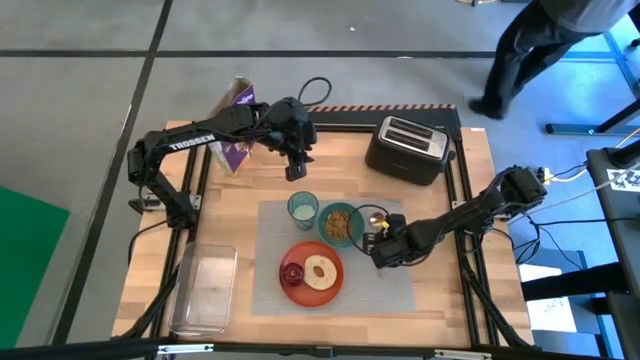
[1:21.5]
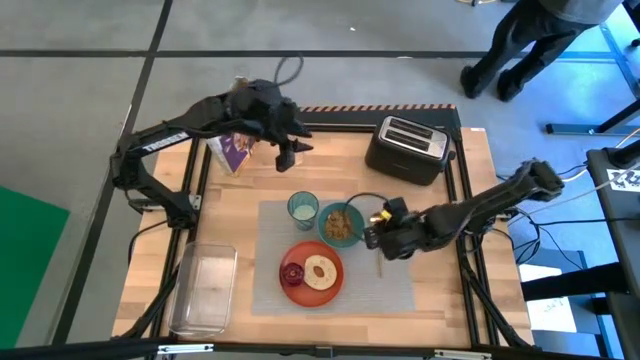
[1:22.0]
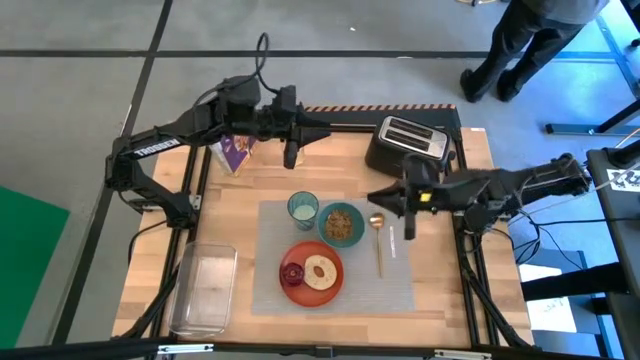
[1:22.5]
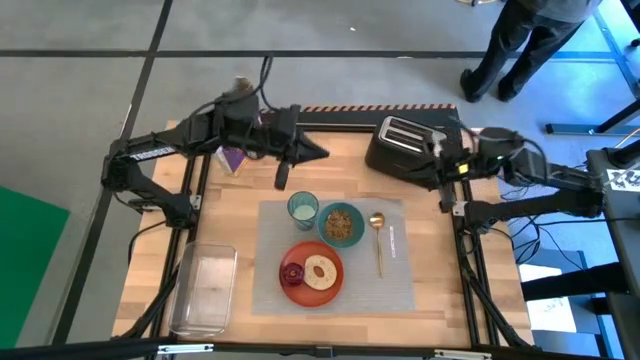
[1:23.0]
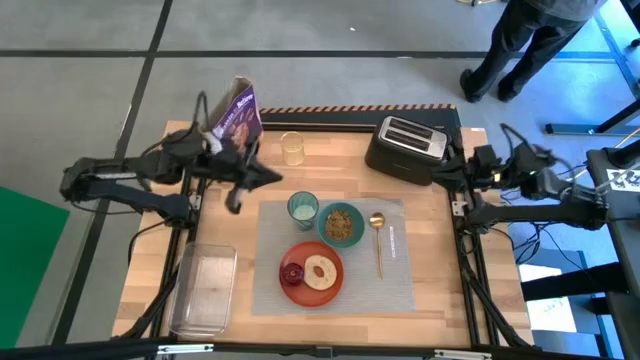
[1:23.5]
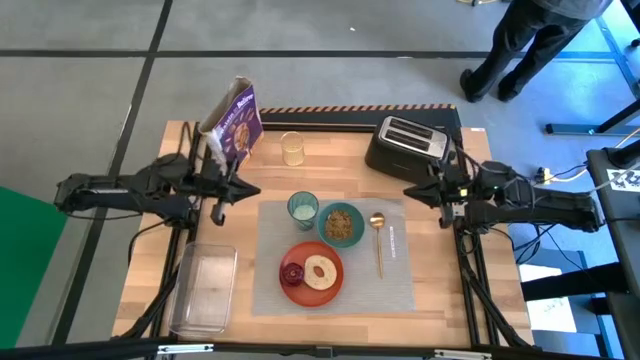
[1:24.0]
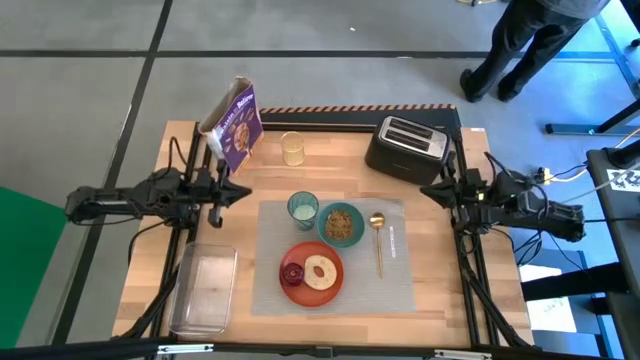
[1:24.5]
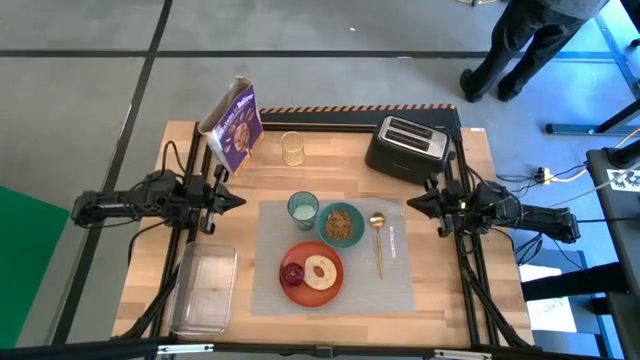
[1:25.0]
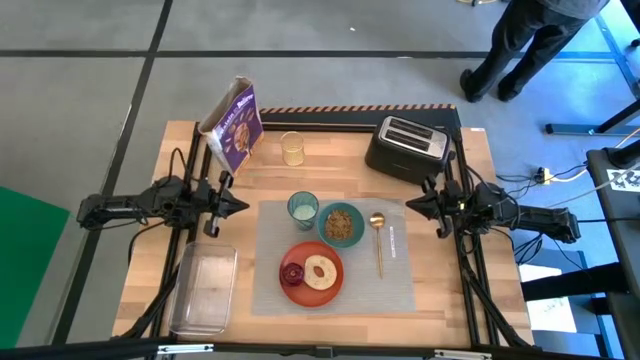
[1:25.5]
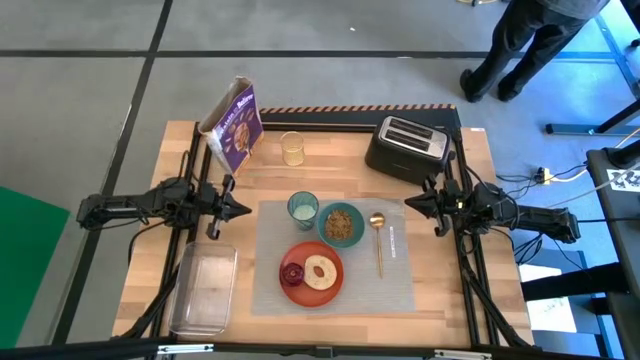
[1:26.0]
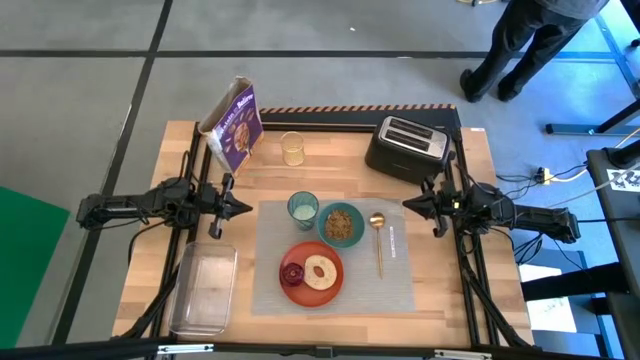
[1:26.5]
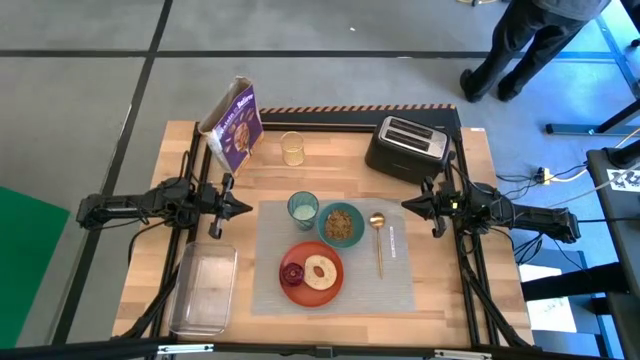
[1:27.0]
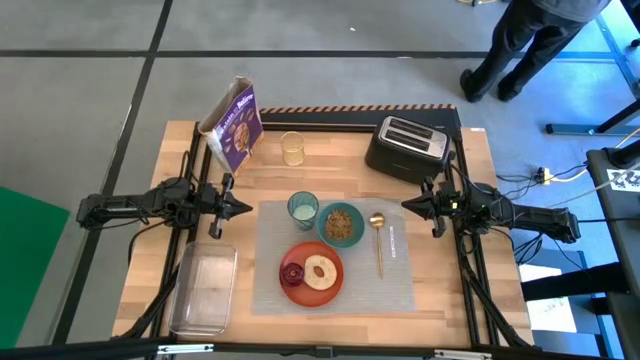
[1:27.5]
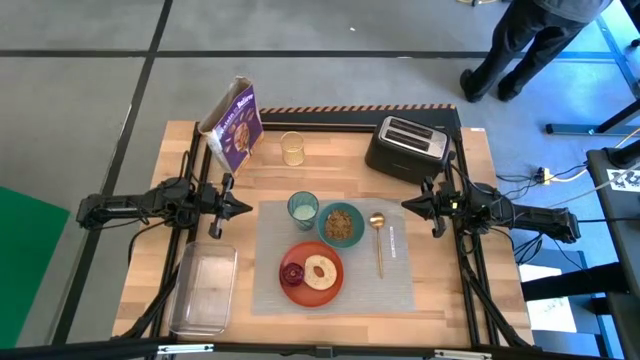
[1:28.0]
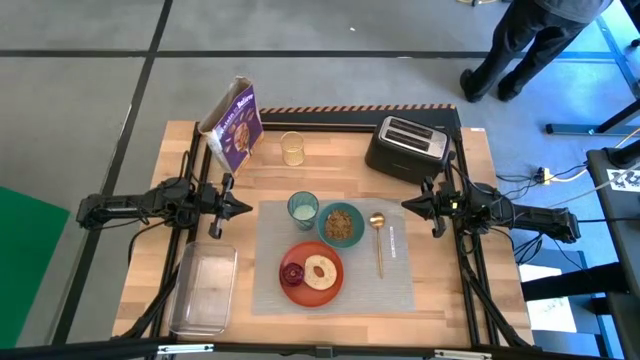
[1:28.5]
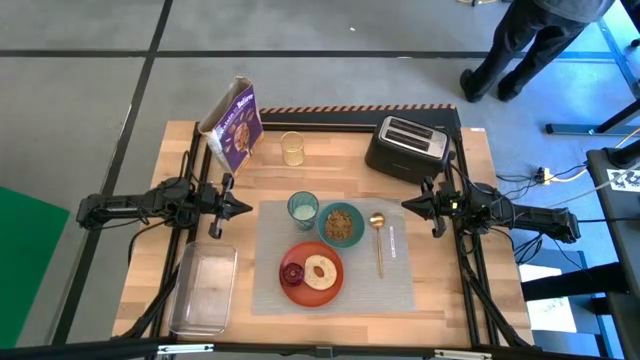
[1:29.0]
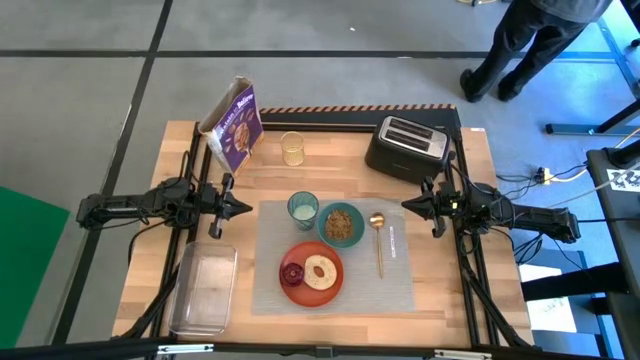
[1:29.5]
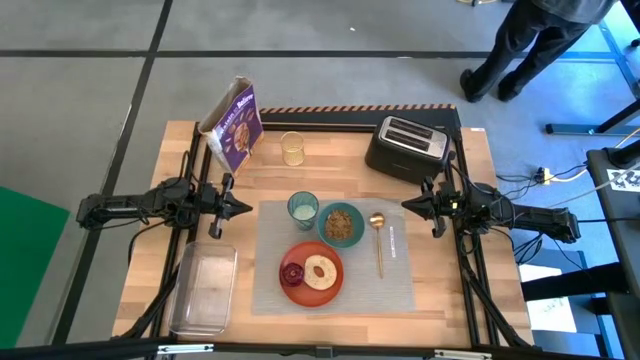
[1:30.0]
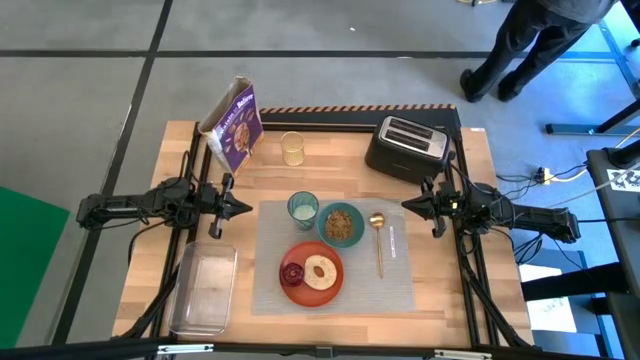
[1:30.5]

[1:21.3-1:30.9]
Task: Arrange a breakfast setting
Return to Home Position

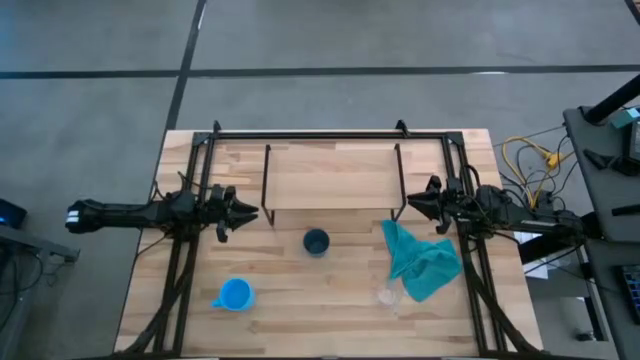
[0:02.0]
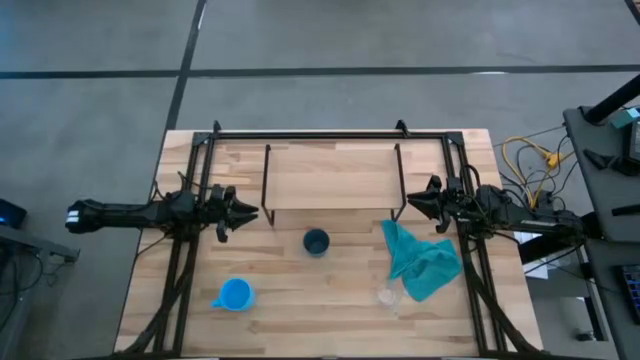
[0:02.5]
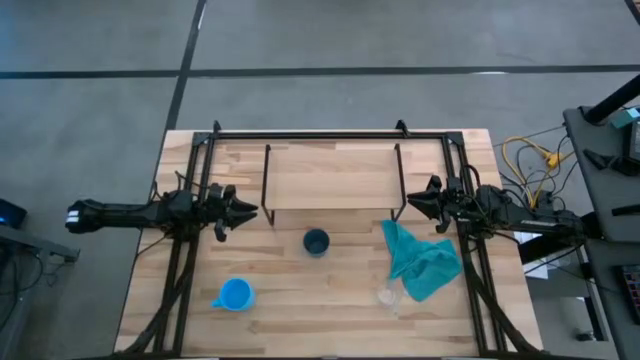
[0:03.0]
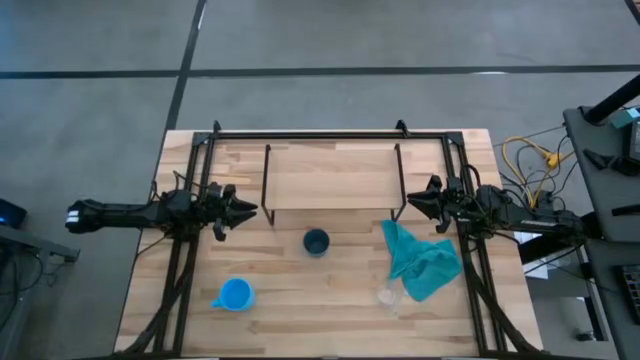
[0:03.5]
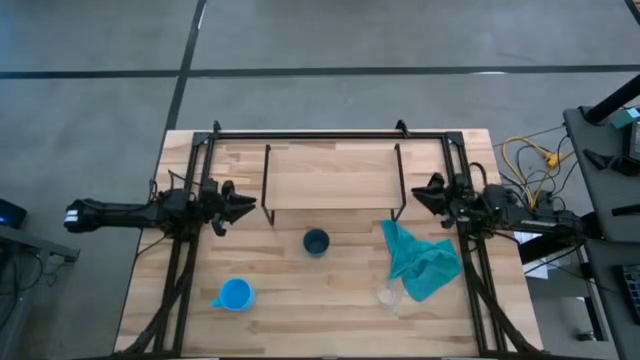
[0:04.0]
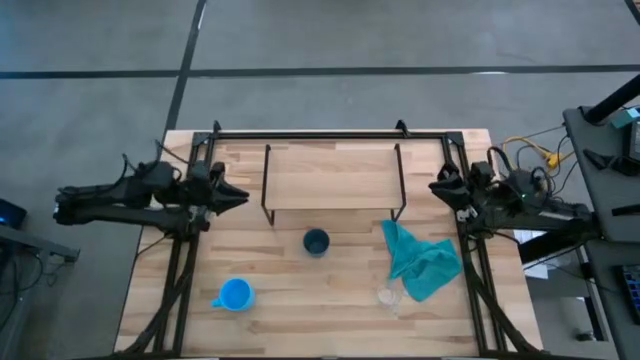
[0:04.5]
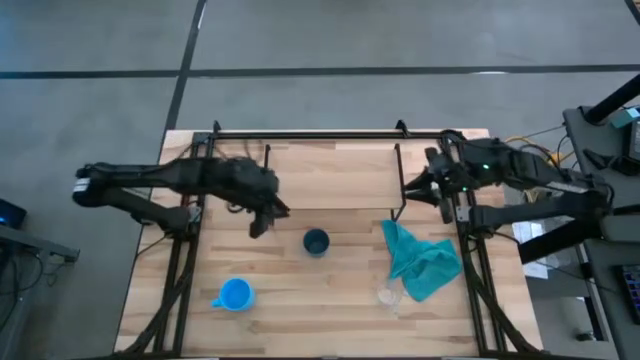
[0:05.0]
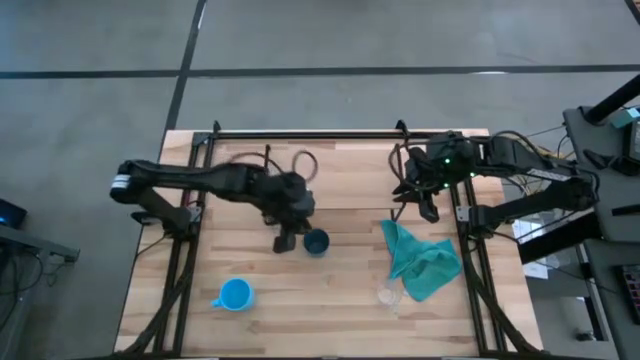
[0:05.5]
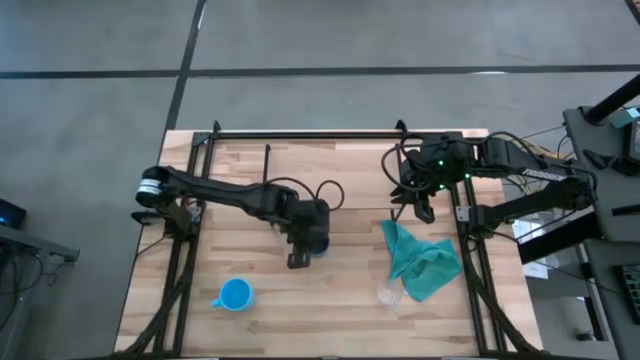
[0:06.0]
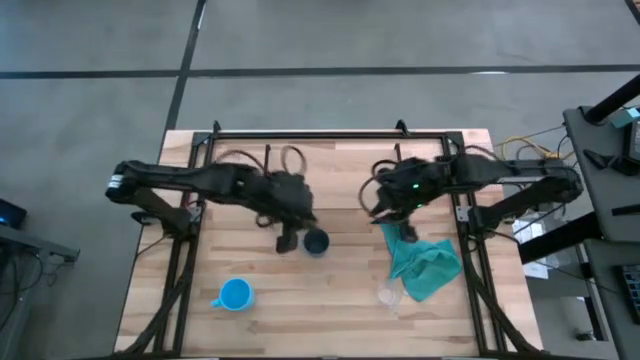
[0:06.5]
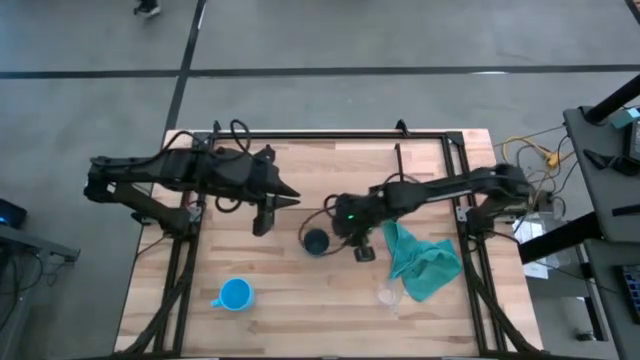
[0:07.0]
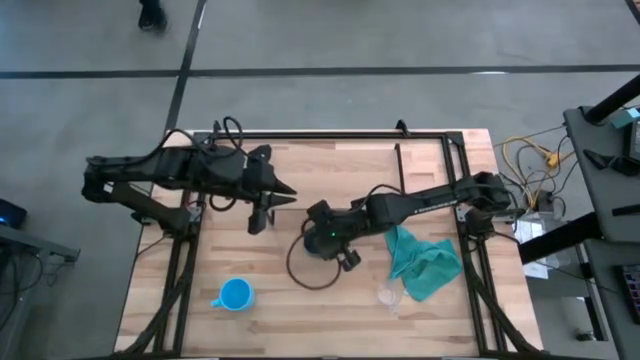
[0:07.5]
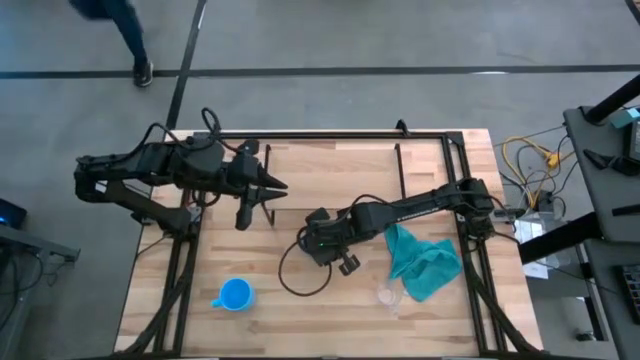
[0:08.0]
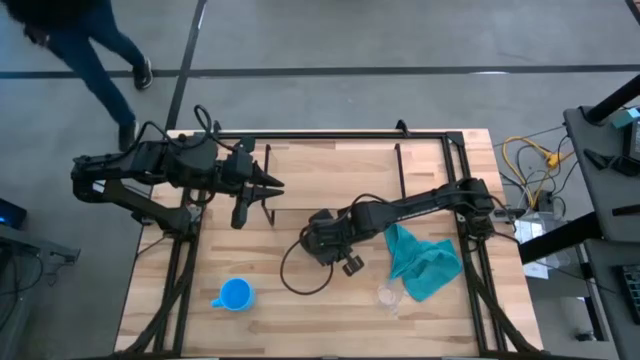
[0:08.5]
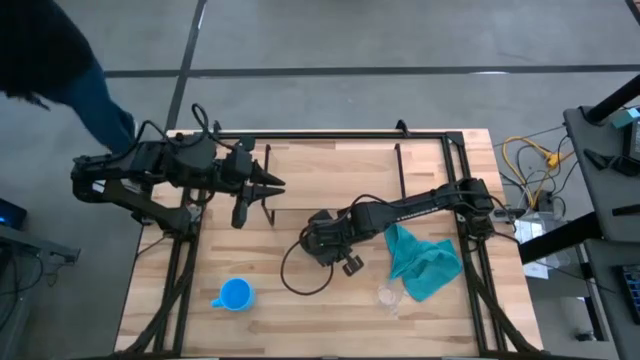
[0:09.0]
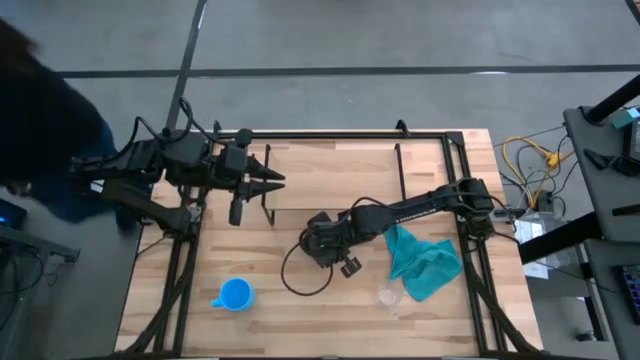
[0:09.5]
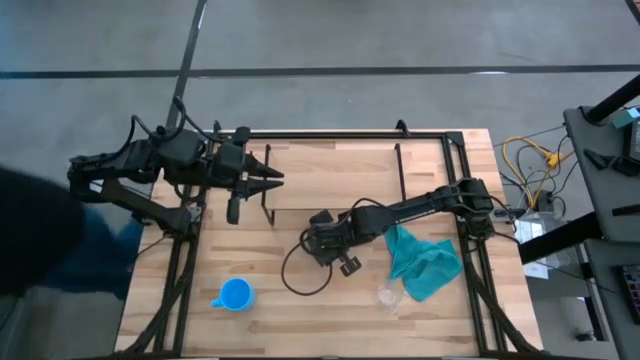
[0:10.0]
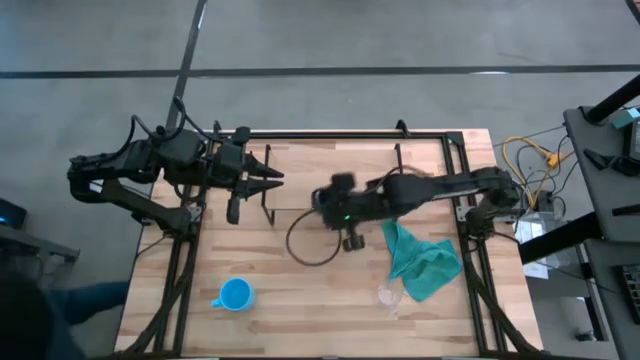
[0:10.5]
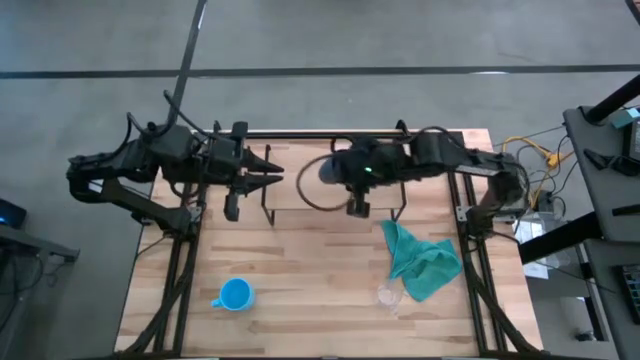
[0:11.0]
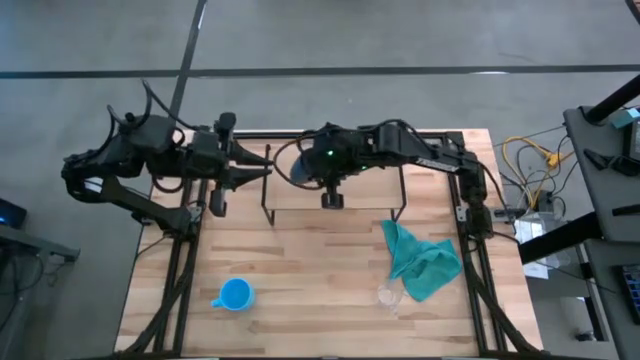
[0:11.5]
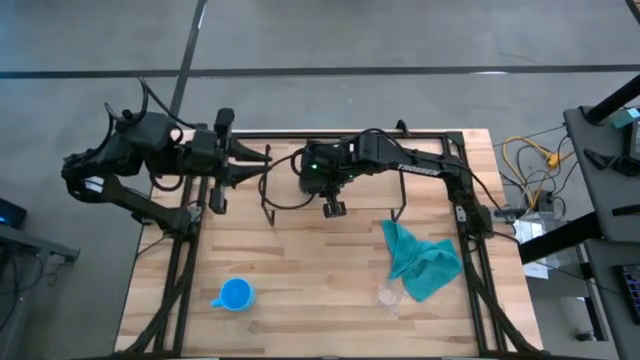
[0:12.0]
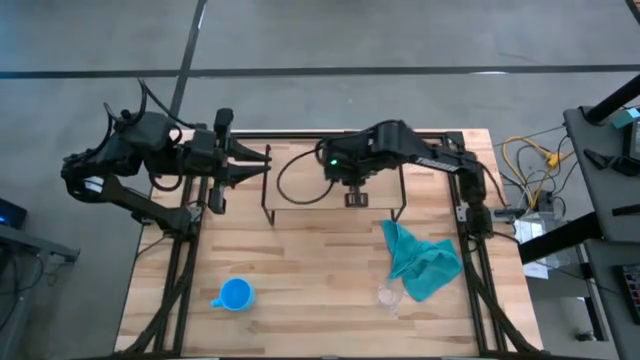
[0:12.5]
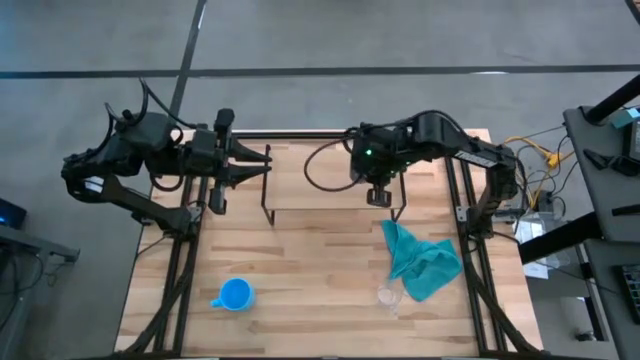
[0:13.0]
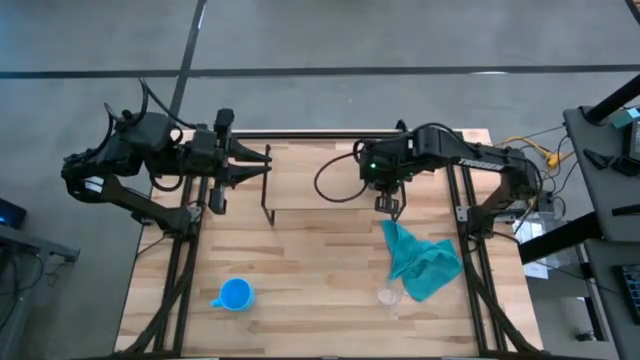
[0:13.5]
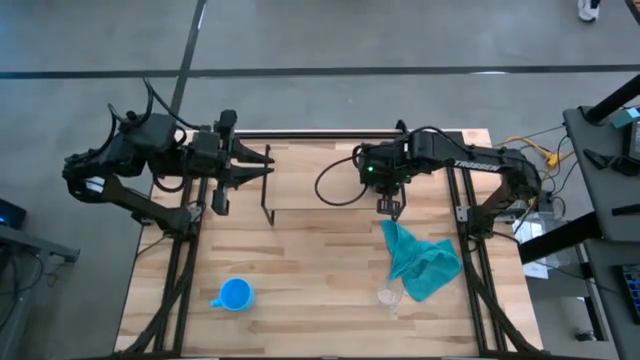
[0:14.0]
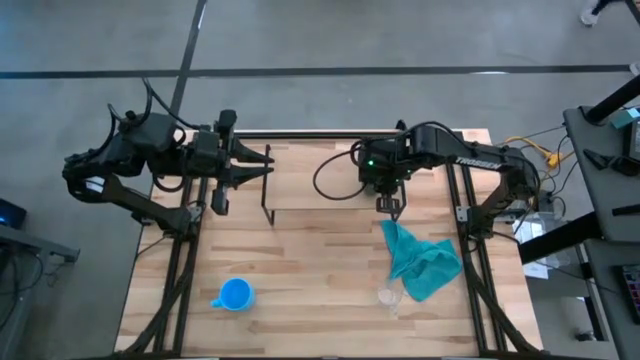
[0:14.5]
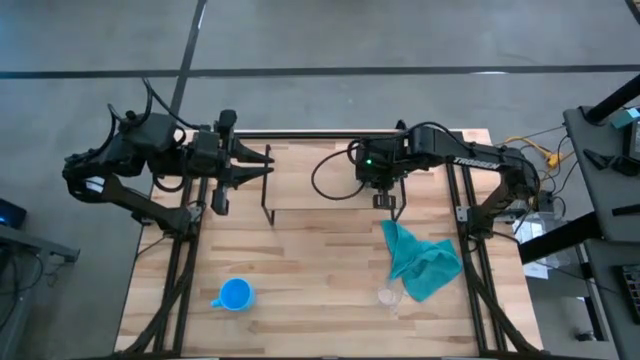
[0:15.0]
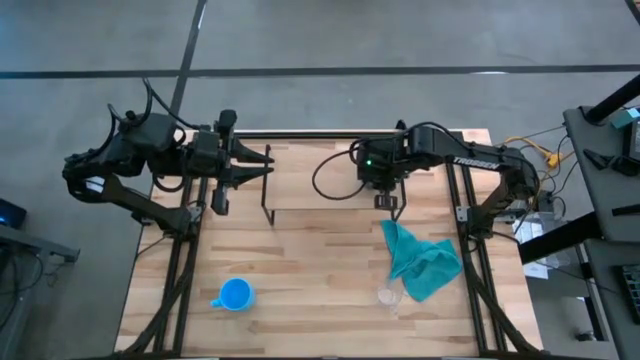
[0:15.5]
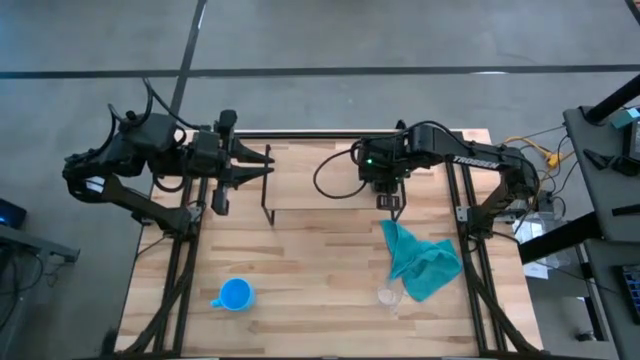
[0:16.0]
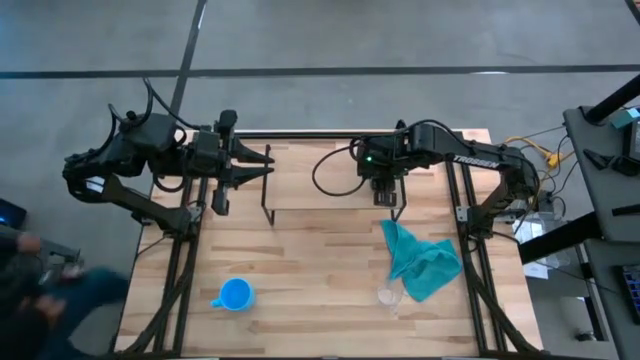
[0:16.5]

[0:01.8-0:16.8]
Task: Stack small to large cups/mugs on shelf
Put the dark blue plastic cup on the shelf
